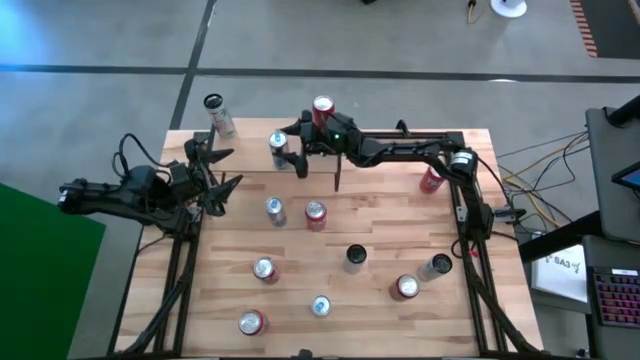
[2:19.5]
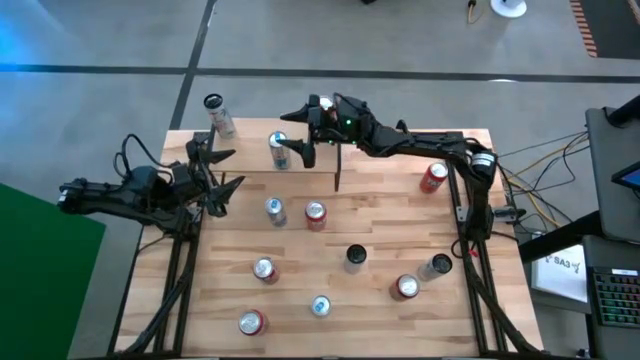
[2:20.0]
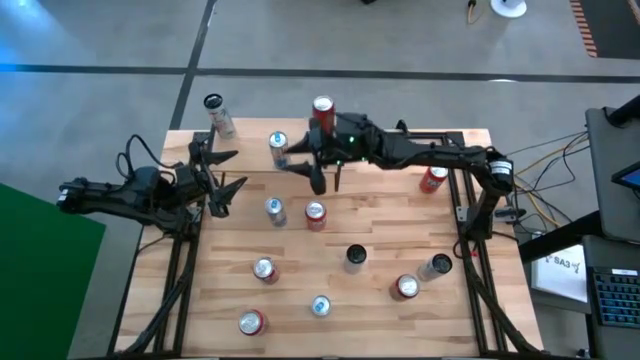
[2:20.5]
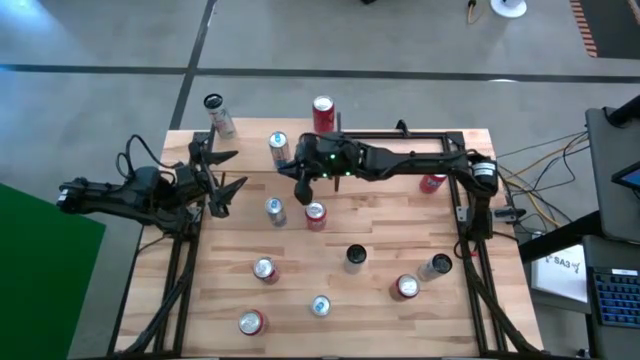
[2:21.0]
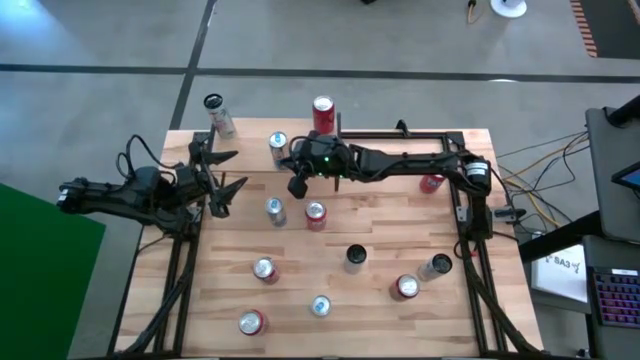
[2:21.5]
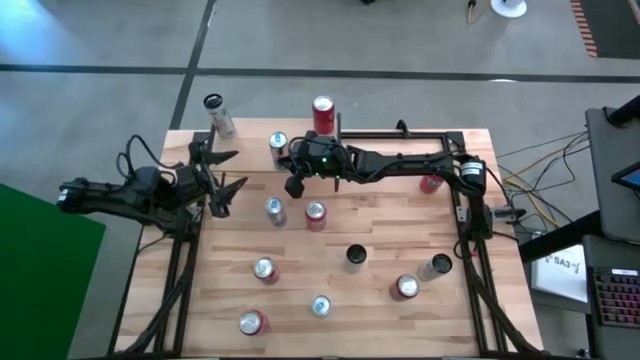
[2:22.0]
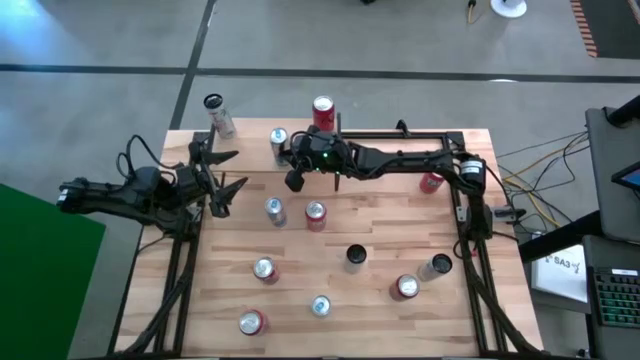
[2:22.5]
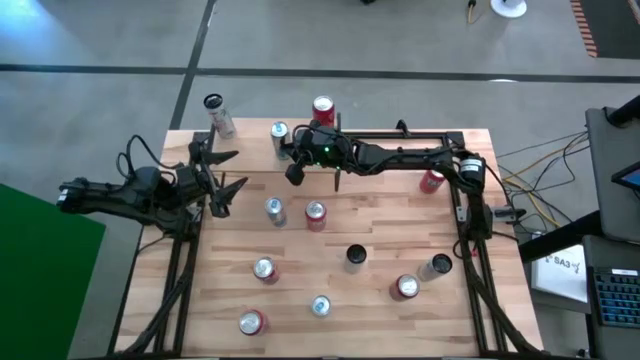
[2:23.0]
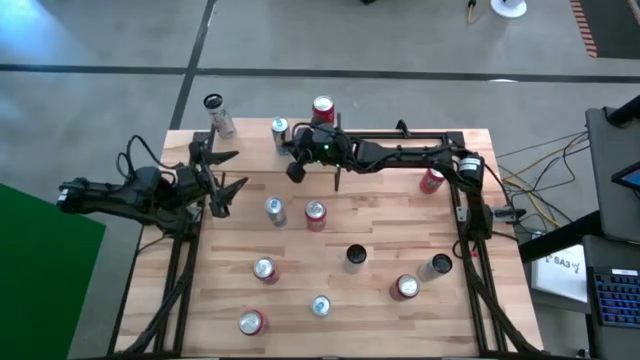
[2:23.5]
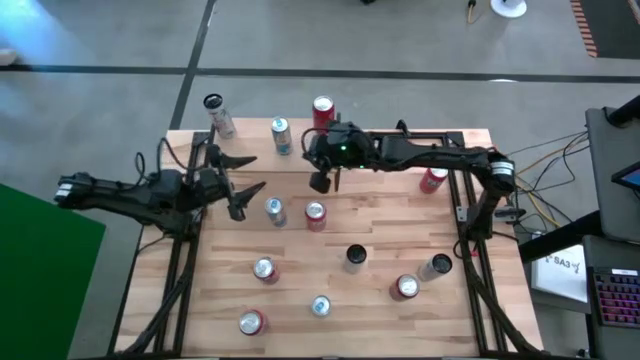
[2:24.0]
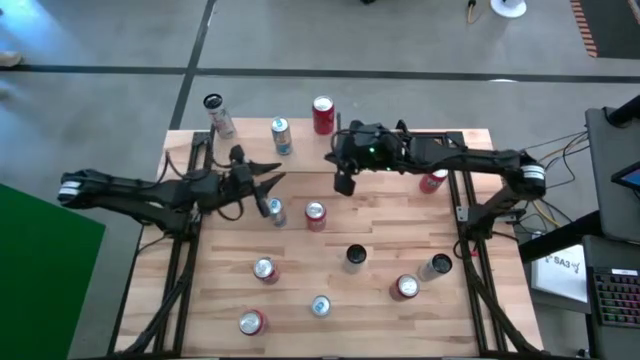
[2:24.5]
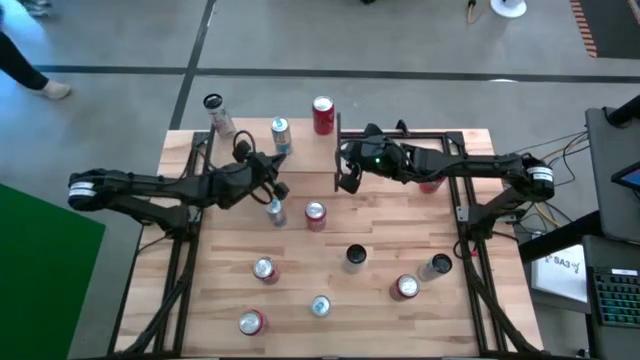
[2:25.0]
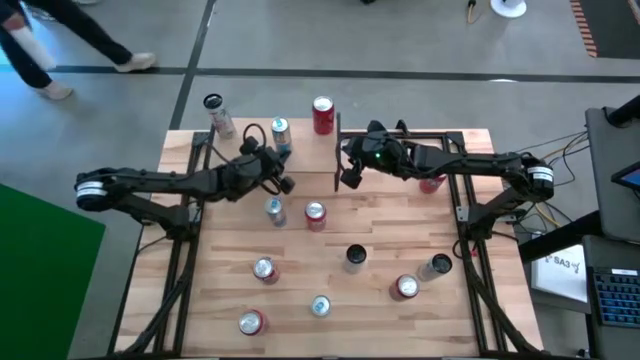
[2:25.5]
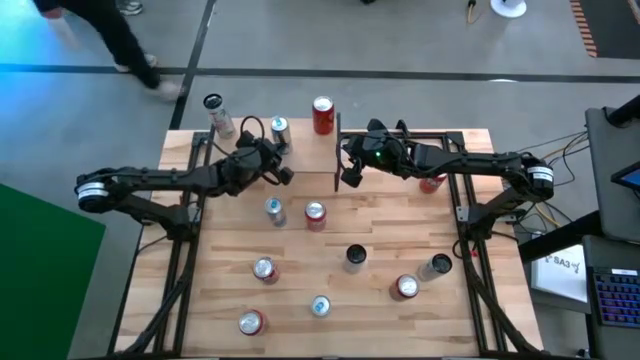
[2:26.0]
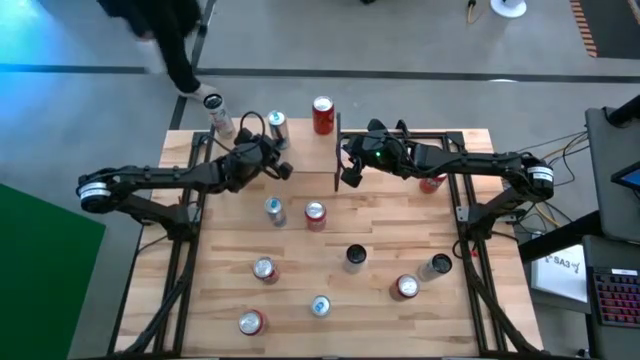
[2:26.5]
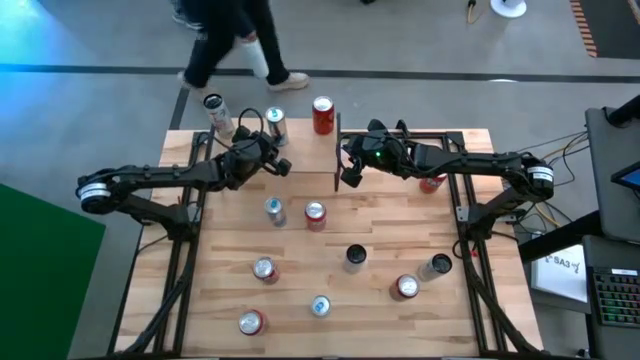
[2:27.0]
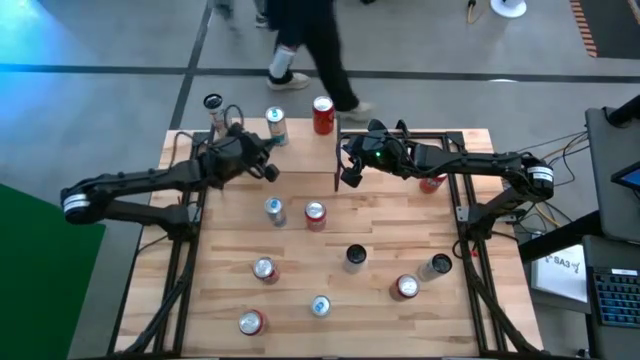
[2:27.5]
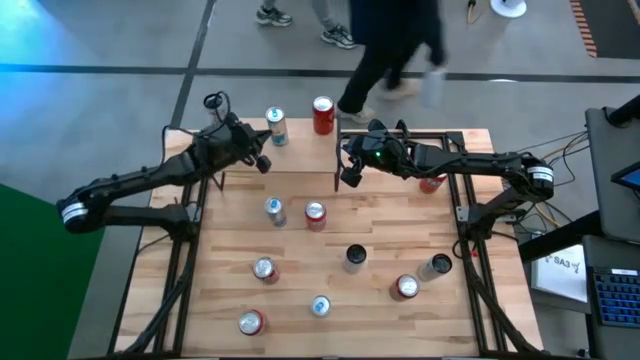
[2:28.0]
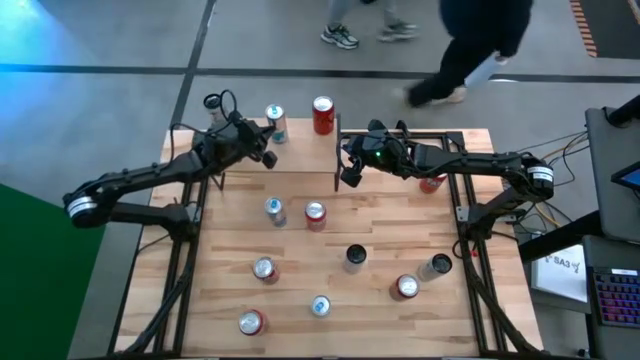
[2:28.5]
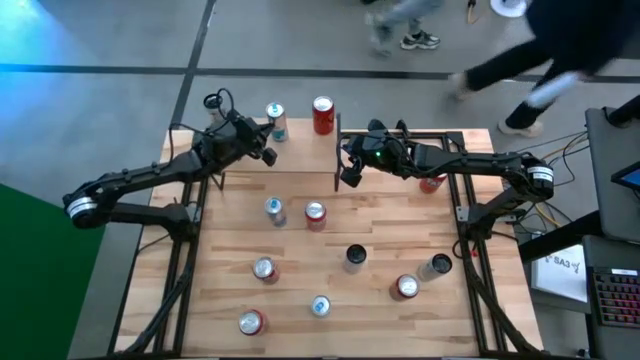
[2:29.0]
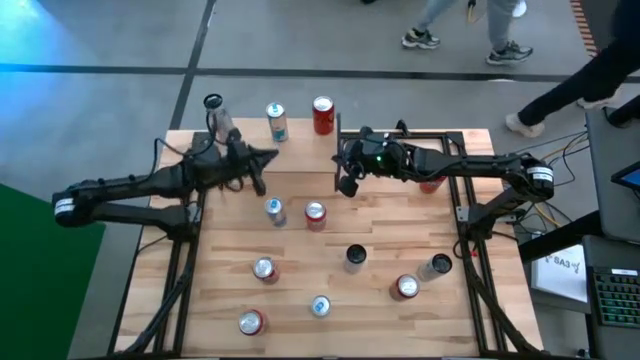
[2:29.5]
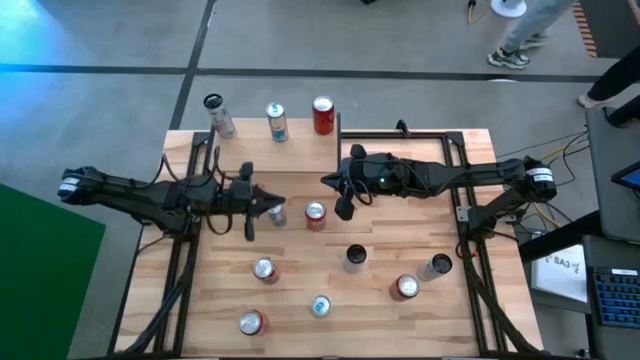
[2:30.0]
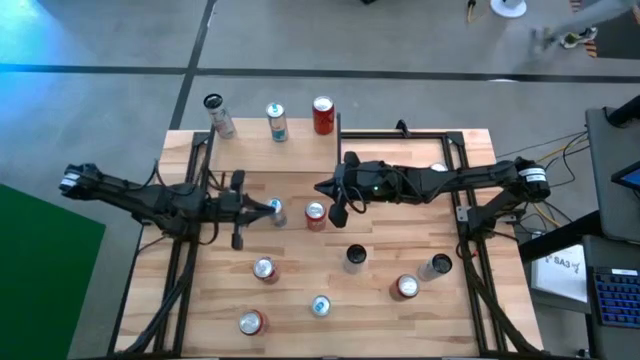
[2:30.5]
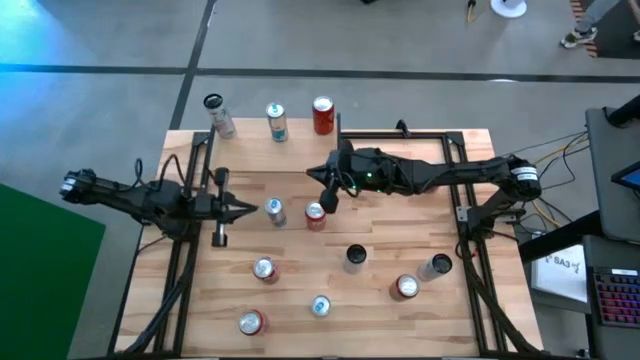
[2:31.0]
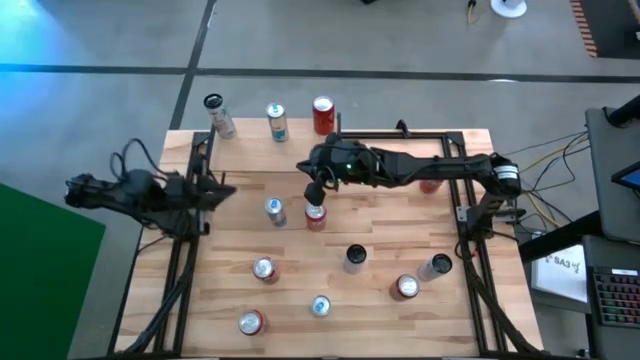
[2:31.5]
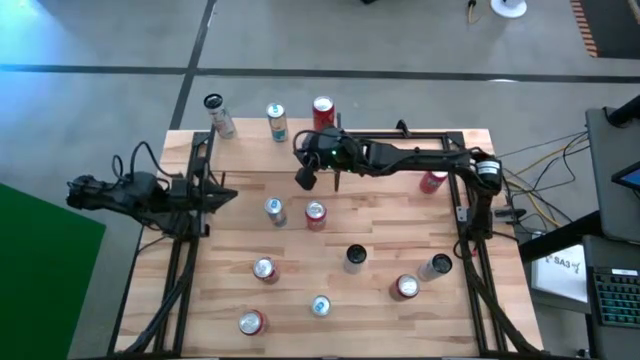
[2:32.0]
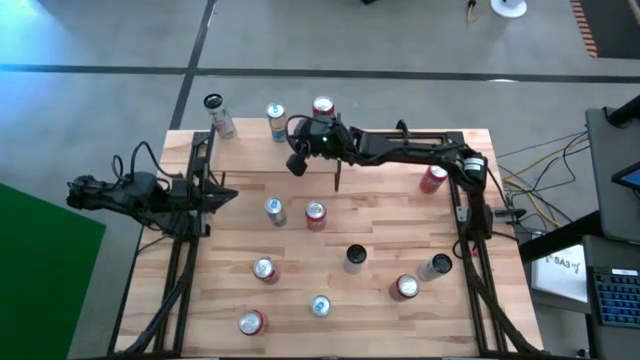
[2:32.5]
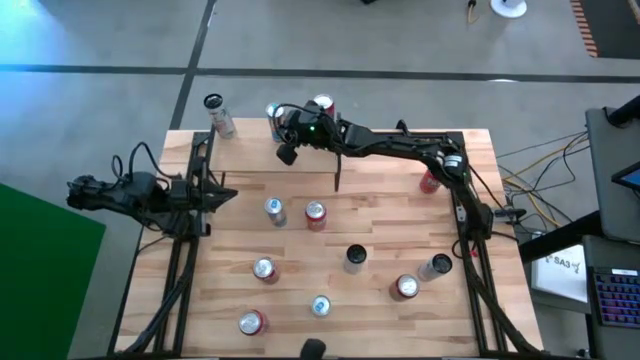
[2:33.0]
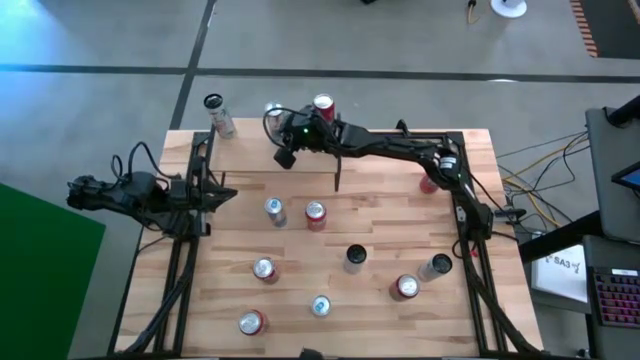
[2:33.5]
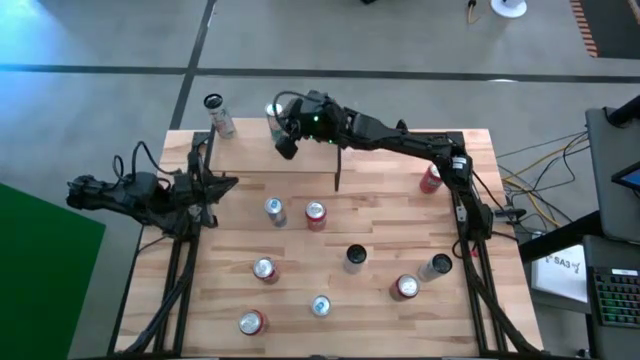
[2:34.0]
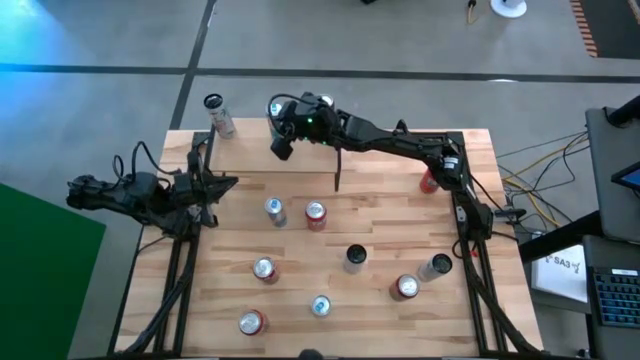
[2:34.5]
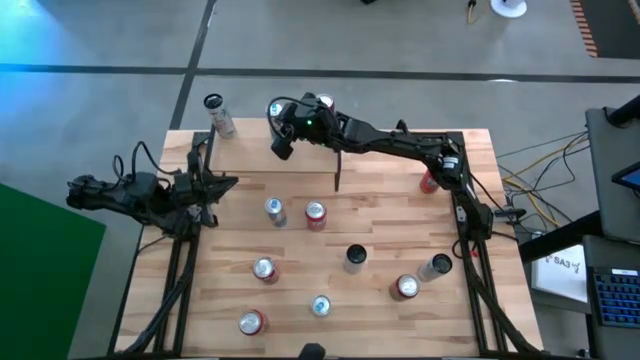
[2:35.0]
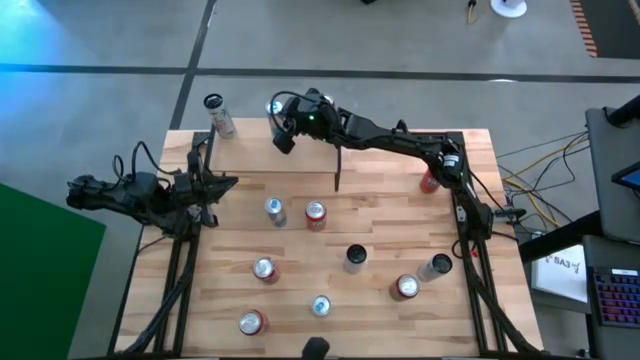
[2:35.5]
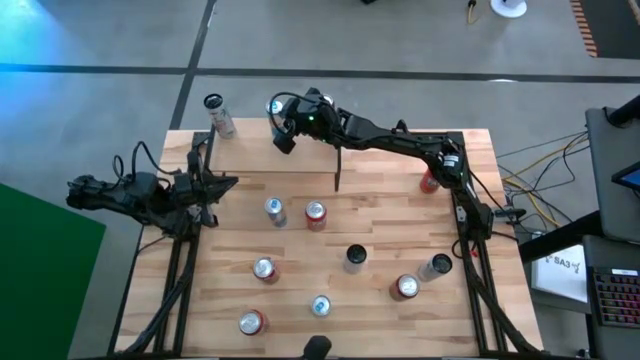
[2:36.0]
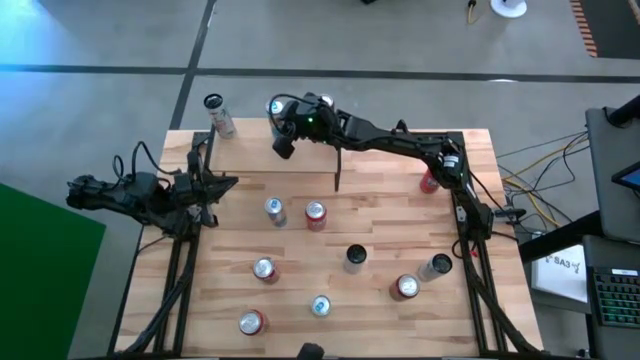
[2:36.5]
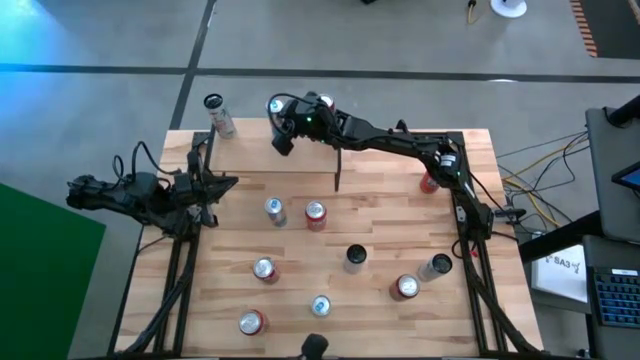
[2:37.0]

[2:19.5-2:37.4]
Task: Place canned beverage on shelf
Put the blue soda can on the shelf

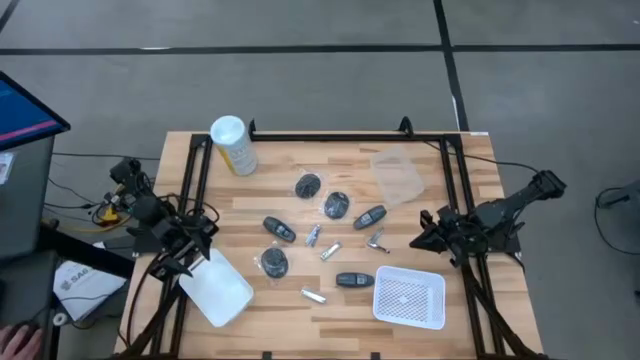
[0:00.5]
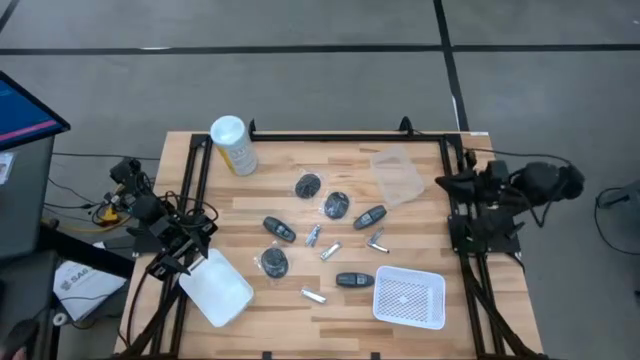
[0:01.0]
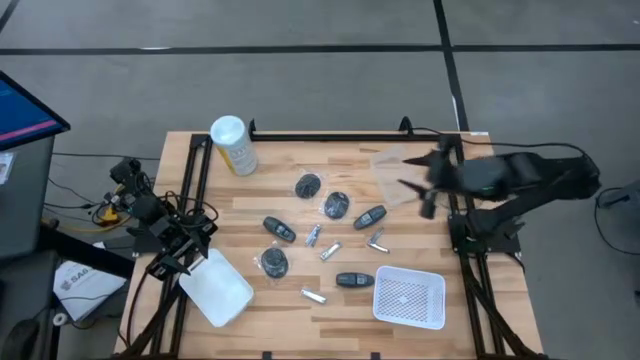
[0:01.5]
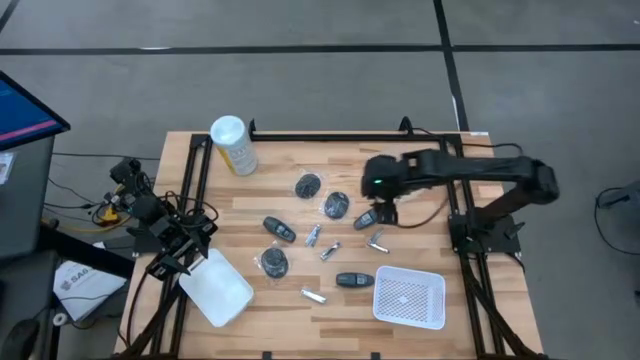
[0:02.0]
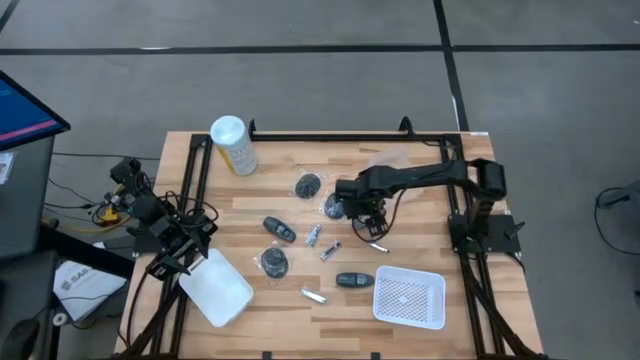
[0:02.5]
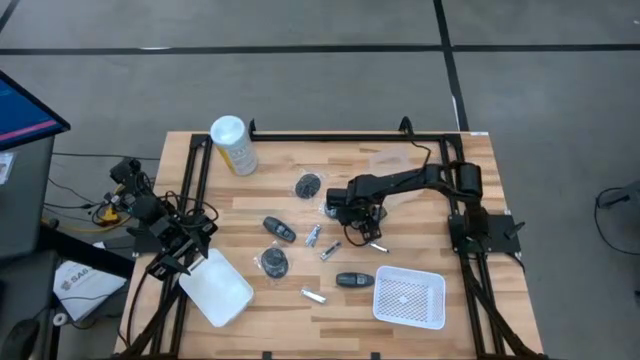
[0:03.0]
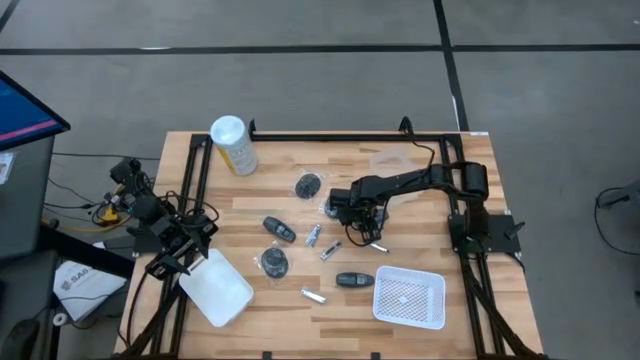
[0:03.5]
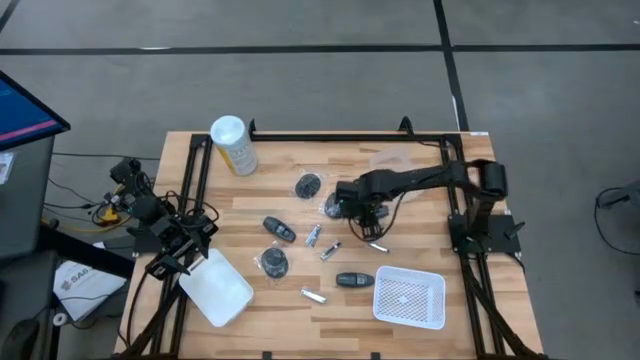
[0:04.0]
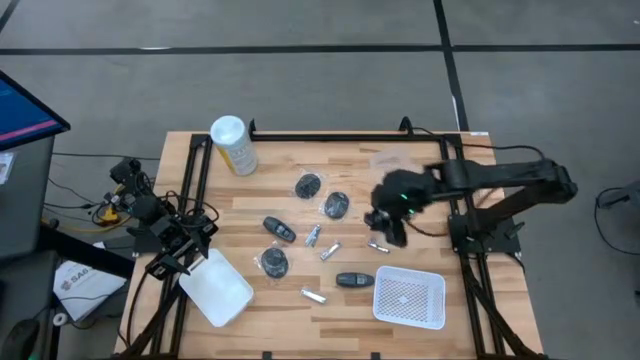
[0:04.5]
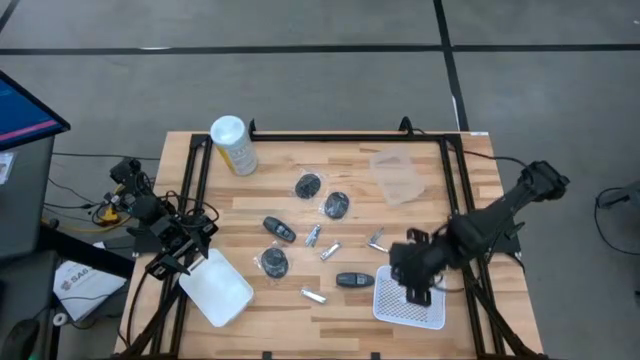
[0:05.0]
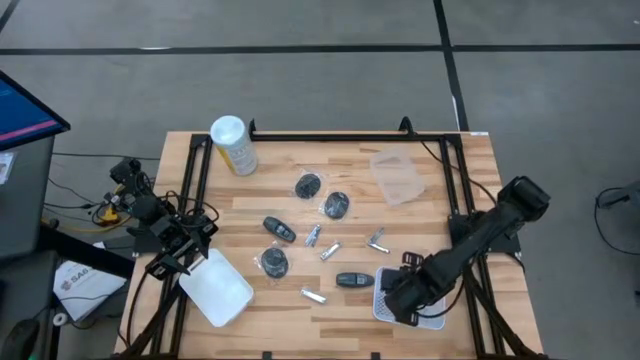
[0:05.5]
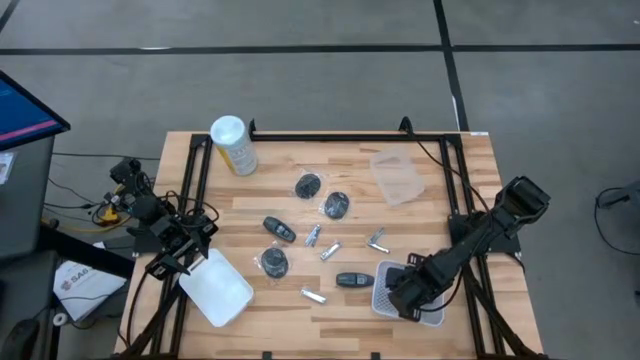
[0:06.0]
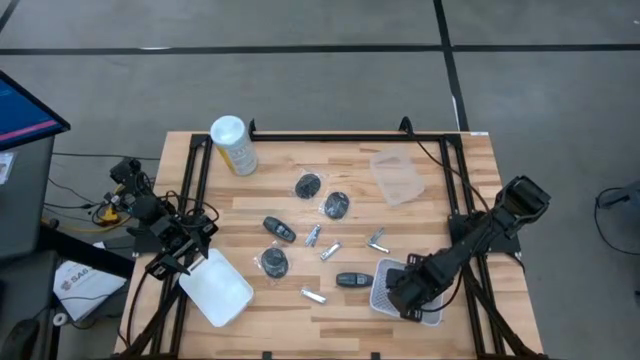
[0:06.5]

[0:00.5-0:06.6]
Task: Pick & Place Travel size toiletries
Put the black deodorant into the right white bin
